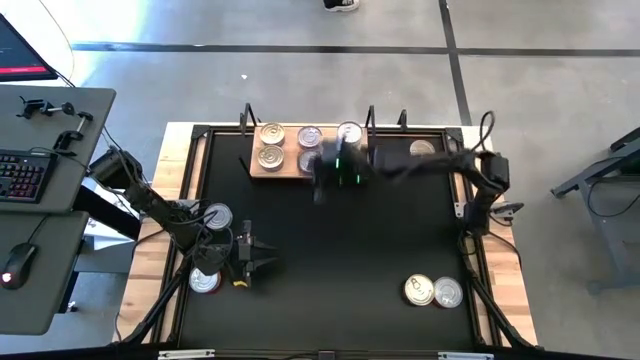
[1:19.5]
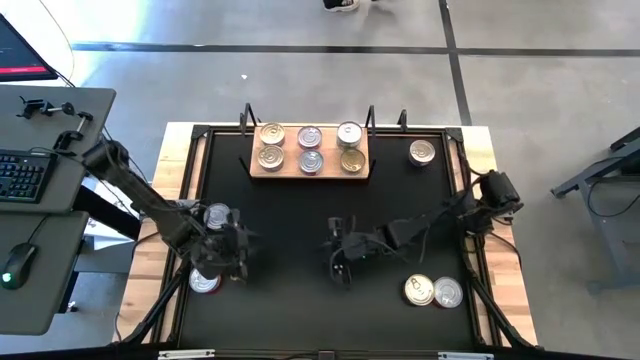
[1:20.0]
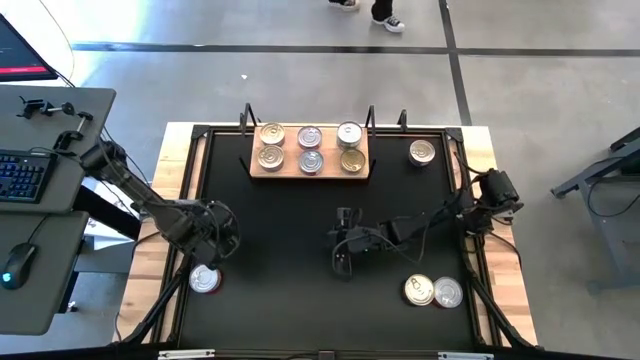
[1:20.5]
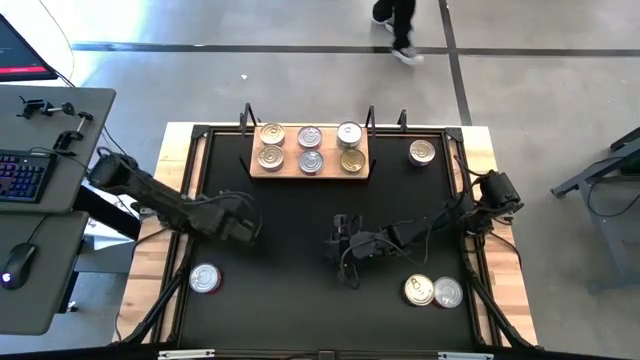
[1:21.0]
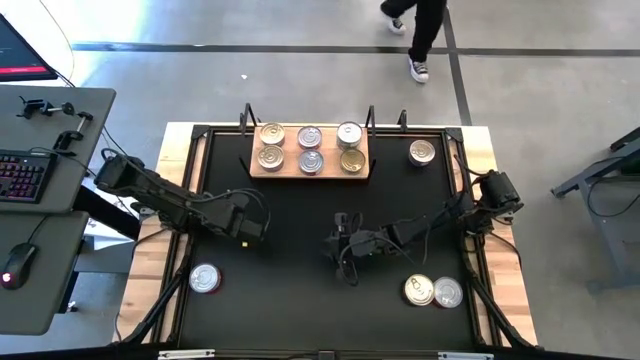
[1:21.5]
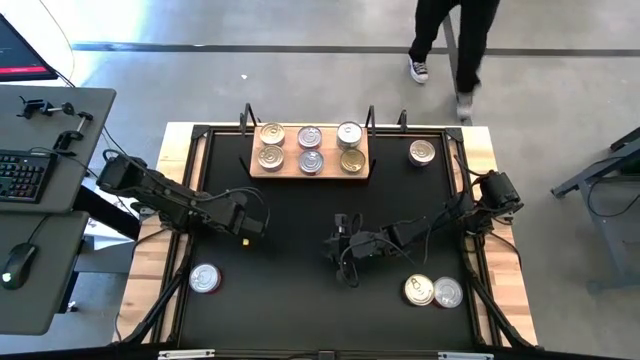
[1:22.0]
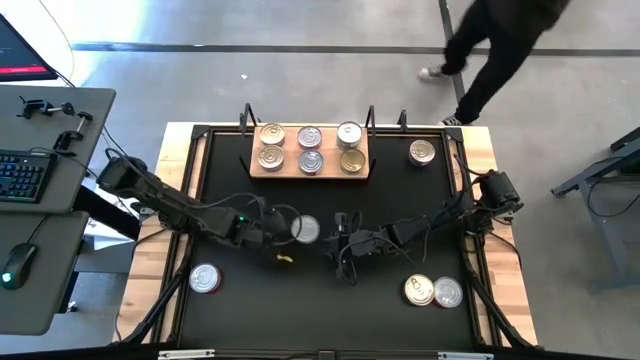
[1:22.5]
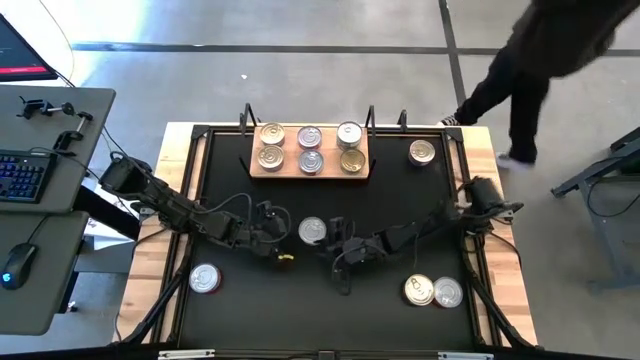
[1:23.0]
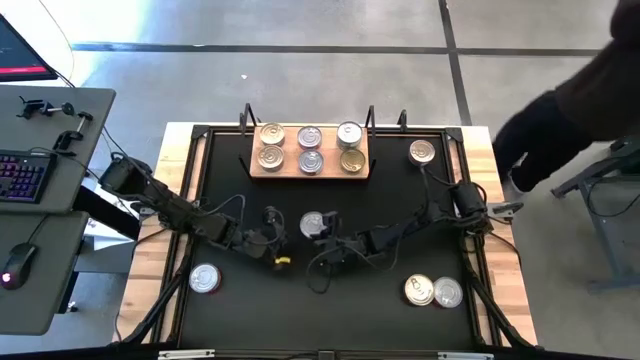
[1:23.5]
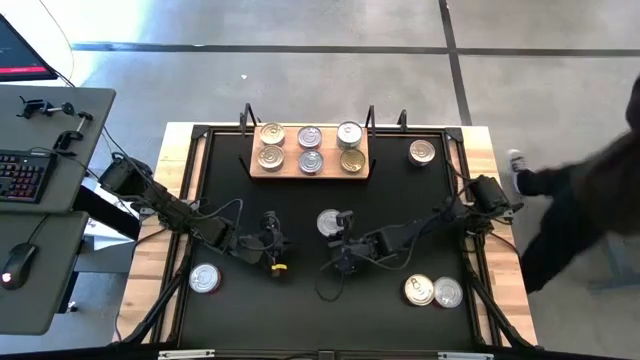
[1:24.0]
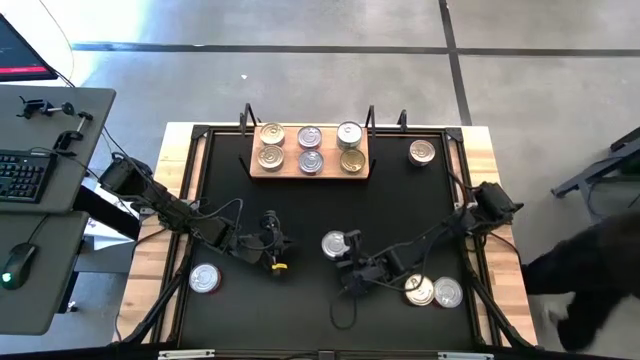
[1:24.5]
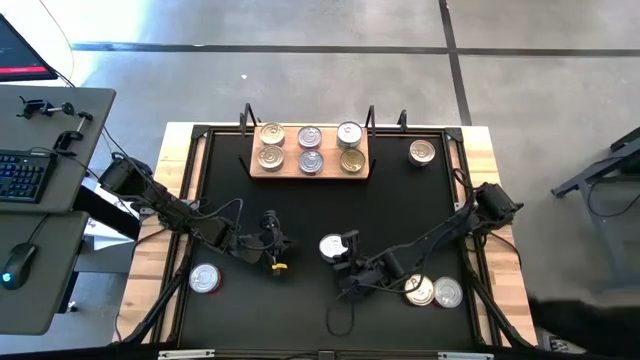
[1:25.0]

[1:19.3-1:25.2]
Task: Stack canned seafood by type on shelf
Stack the green tuna on top of the other green tuna can on the shelf

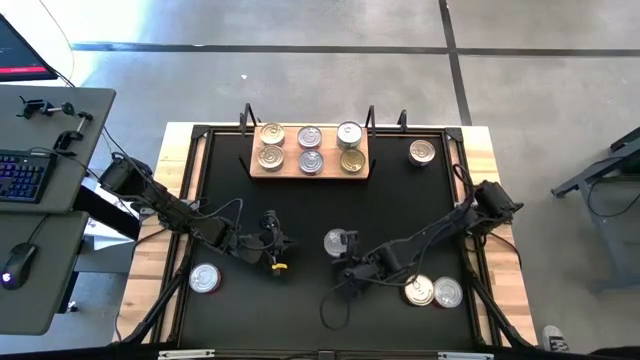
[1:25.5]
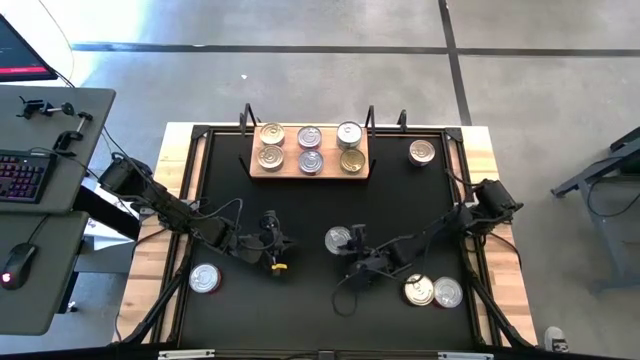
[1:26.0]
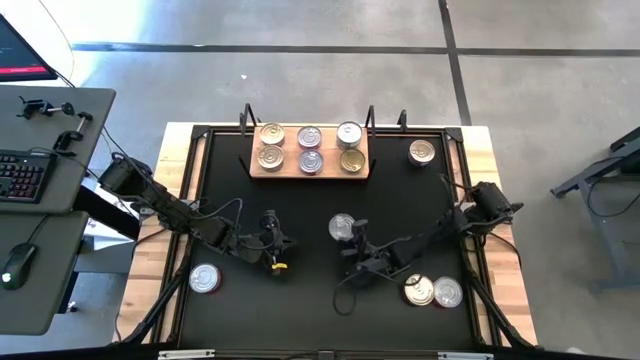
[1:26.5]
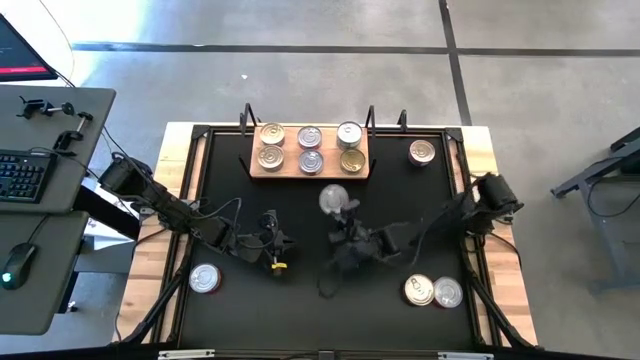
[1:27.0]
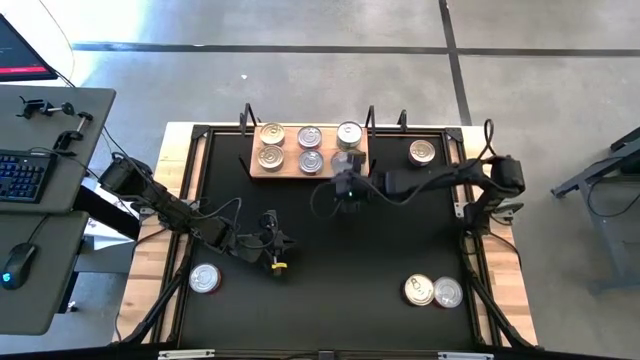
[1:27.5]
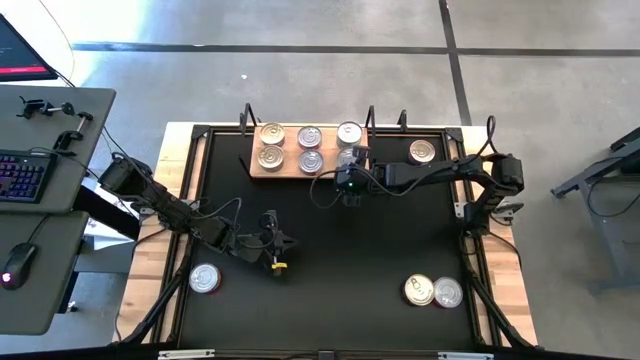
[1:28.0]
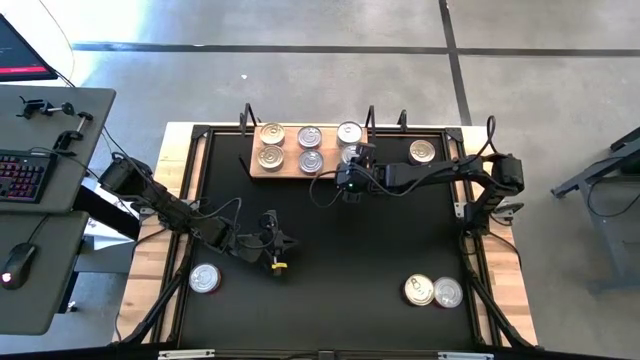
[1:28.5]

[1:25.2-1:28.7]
Stack the green tuna on top of the other green tuna can on the shelf

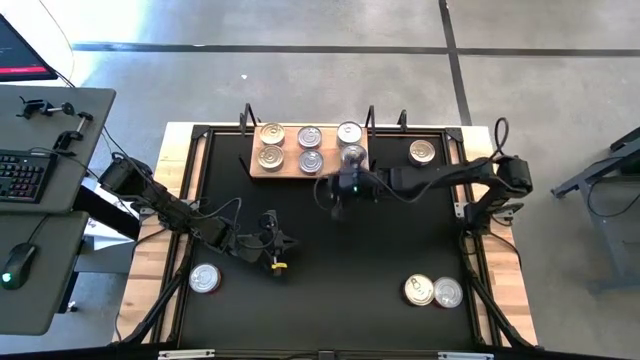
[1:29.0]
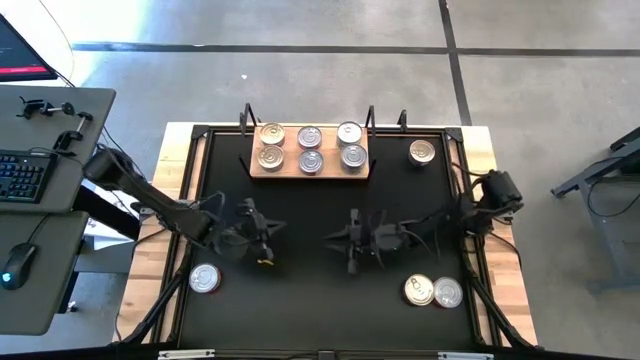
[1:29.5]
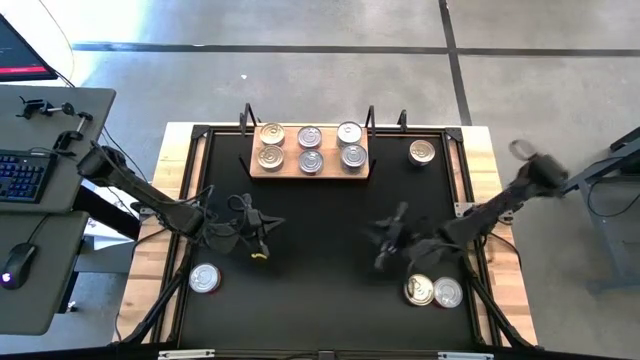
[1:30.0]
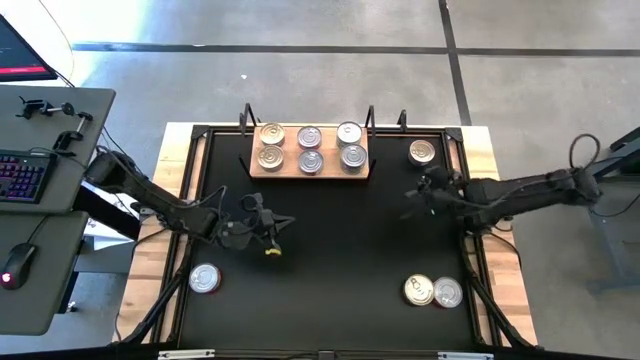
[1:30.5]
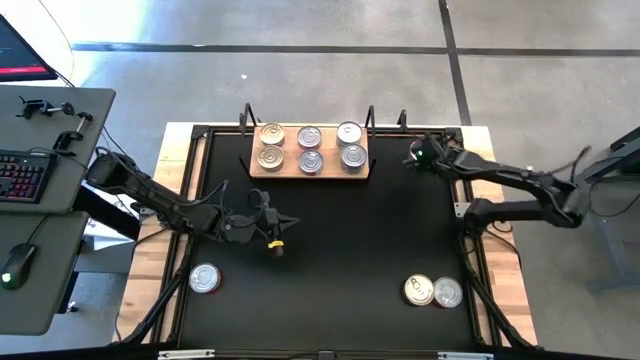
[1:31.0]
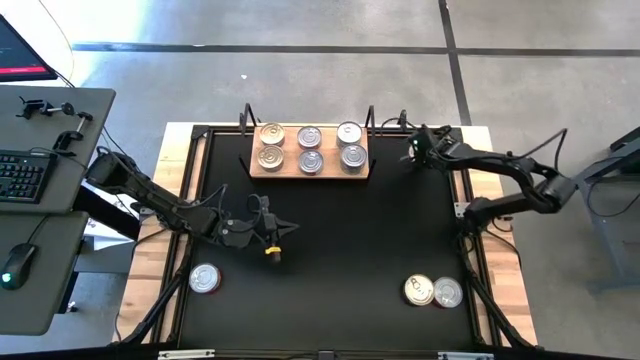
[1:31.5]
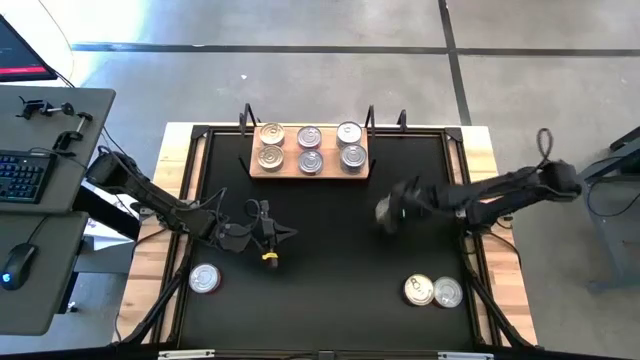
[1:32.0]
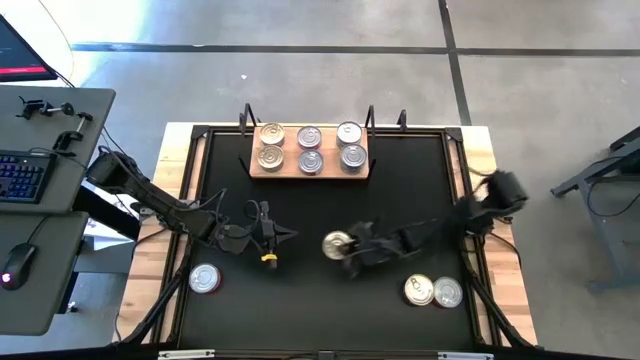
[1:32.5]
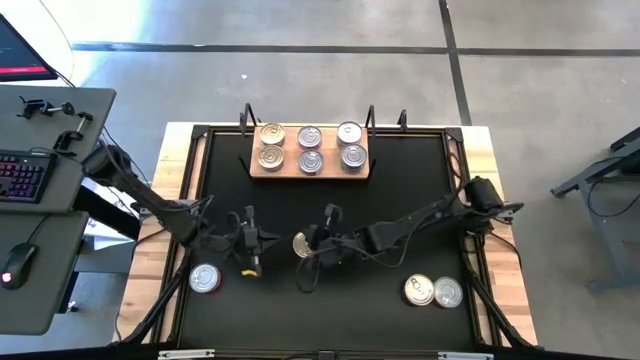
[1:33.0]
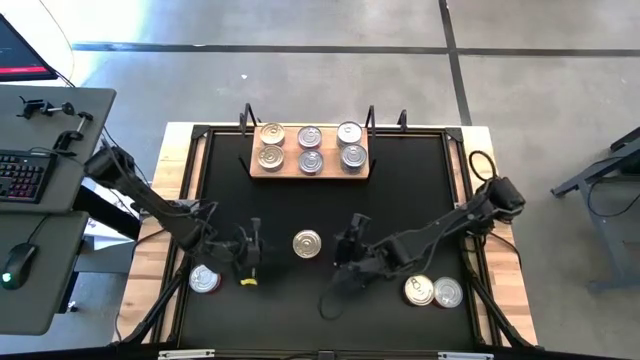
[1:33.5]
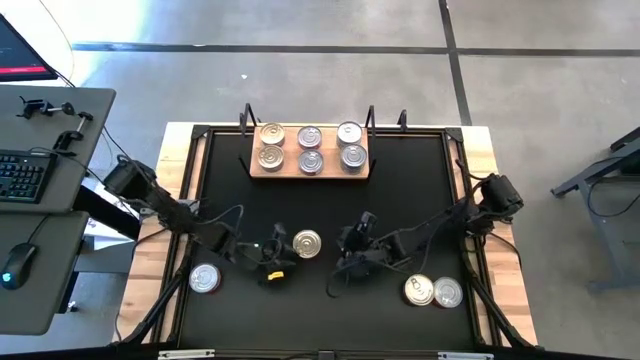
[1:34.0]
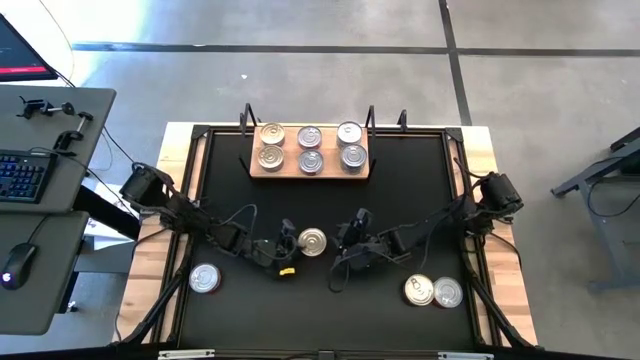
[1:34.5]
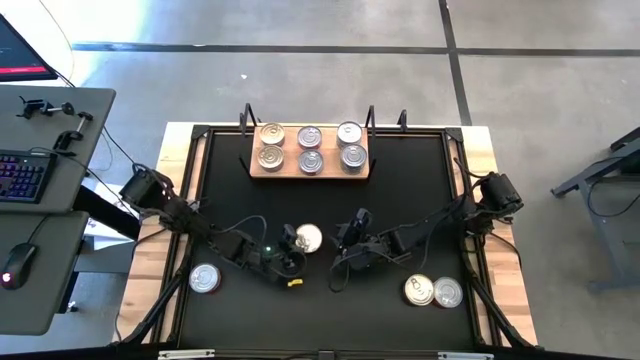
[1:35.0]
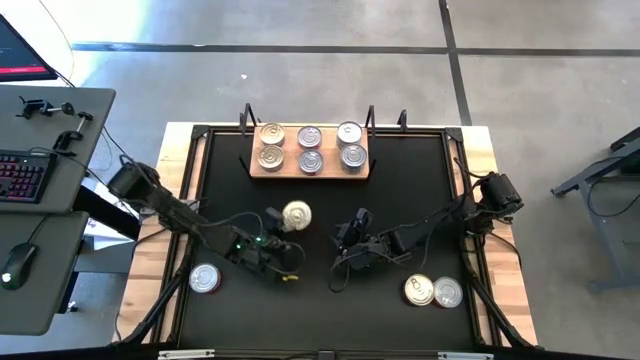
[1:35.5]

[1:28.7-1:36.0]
Stack the blue tuna can on top of the other blue tuna can on the shelf

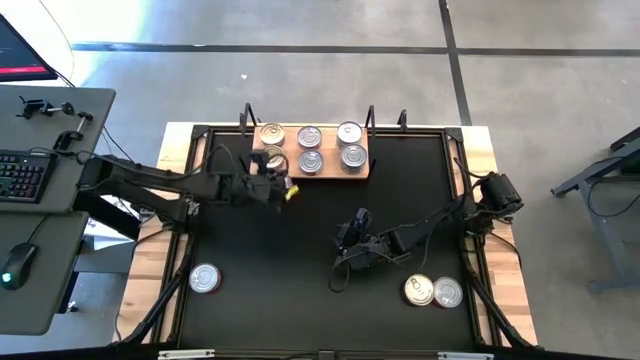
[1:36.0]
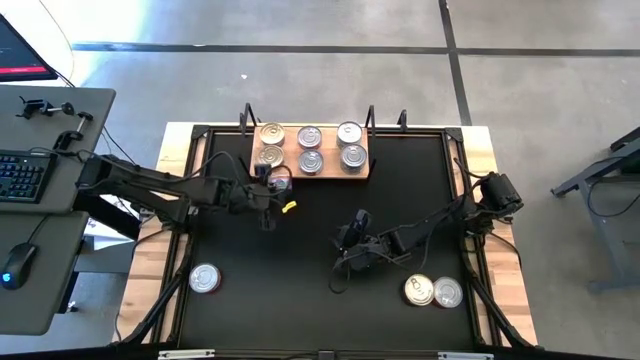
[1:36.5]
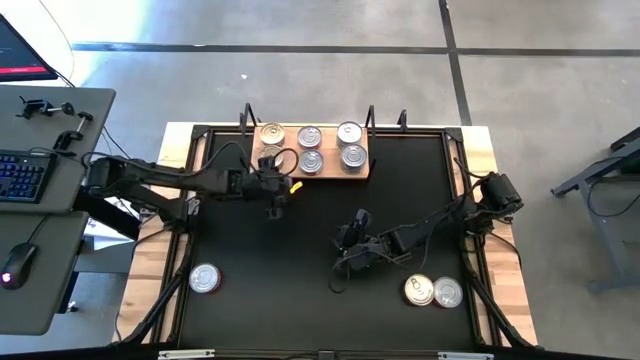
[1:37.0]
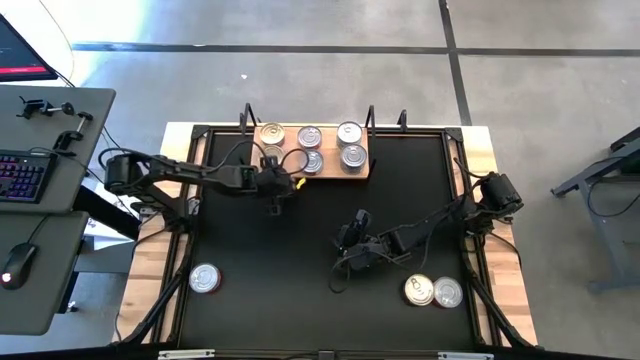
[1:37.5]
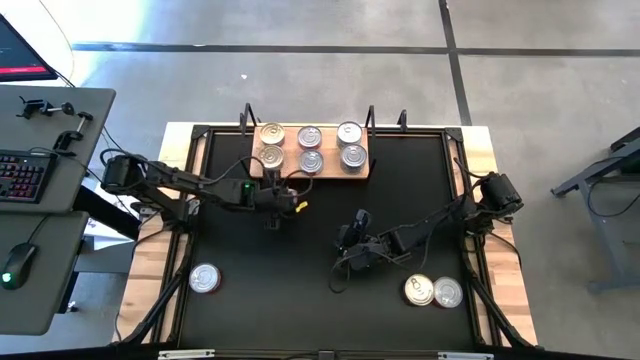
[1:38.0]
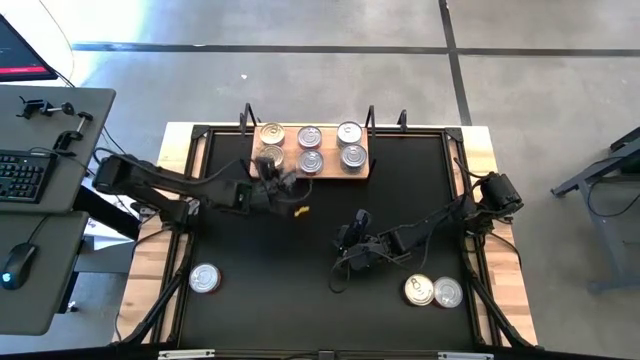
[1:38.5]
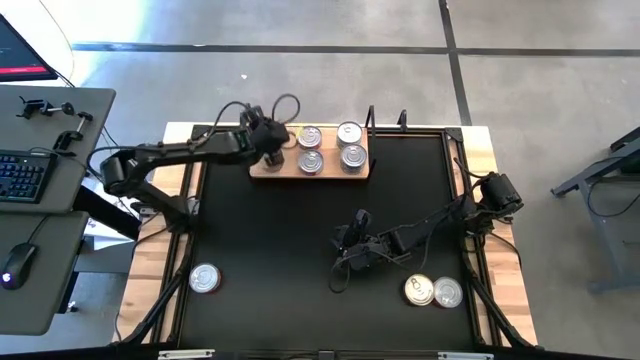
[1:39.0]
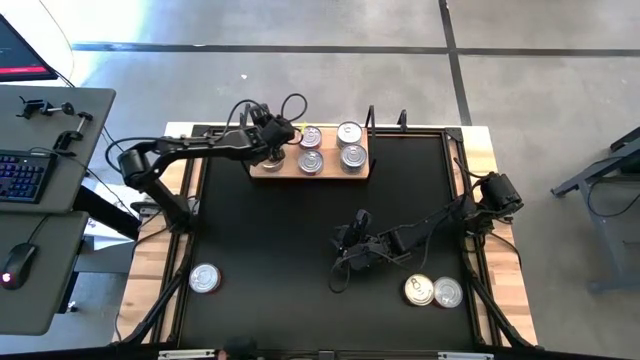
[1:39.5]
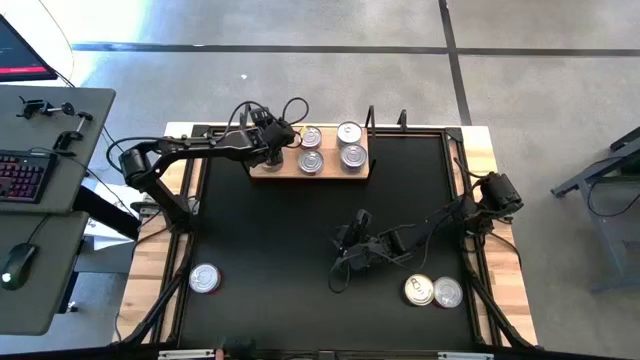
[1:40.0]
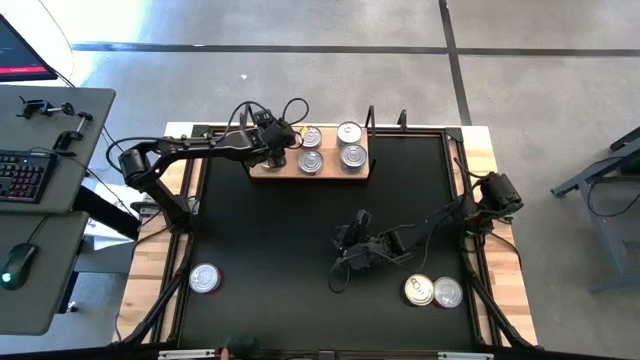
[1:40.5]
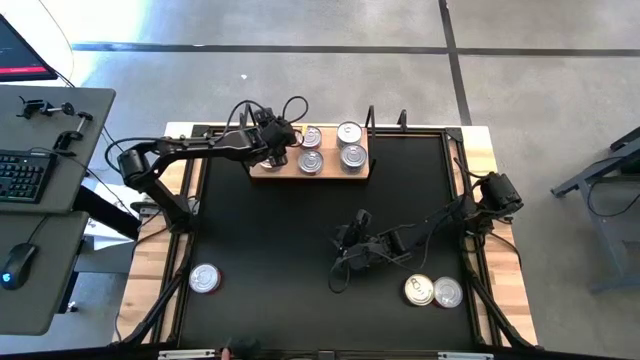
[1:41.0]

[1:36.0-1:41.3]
Stack the blue tuna can on top of the other blue tuna can on the shelf
